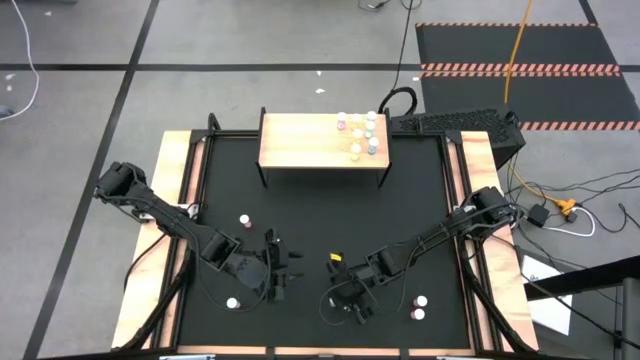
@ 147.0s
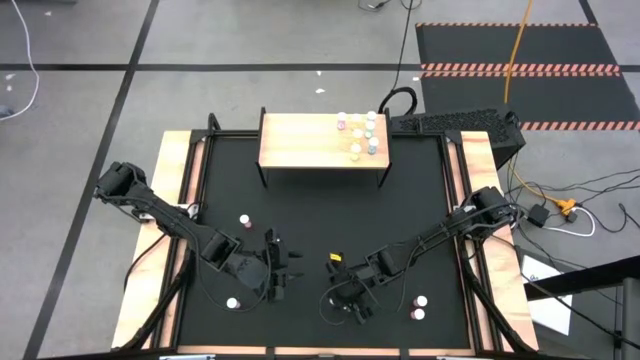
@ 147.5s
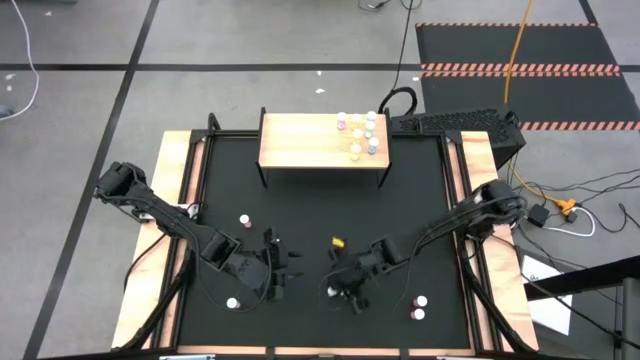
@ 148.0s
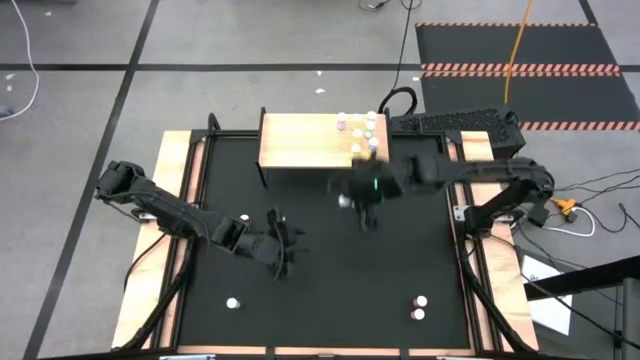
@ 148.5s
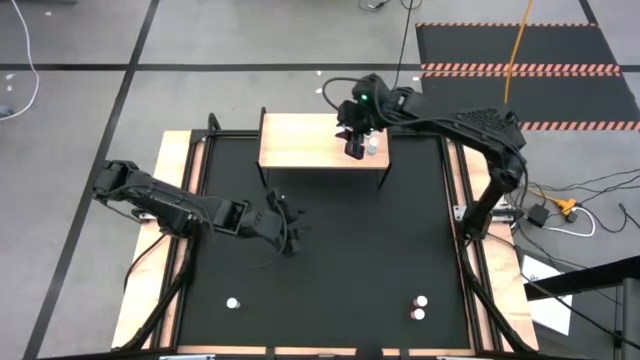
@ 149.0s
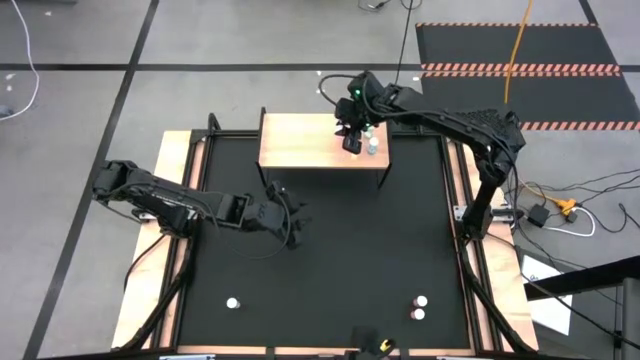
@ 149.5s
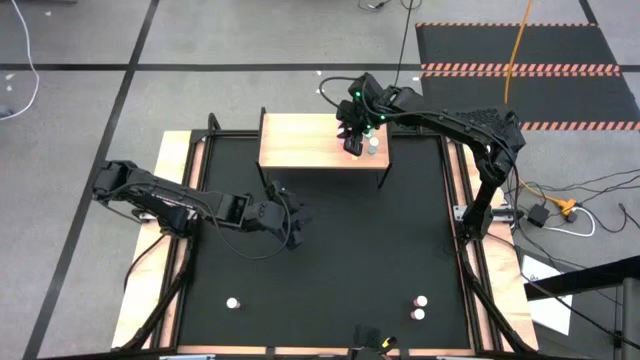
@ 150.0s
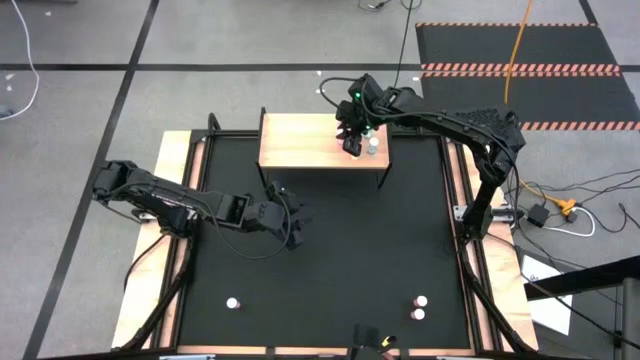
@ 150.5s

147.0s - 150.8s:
Task: Pick and place medicine bottles onto shelf by color
Put the right pink pill bottle on the shelf aligned with the other pink pill bottles

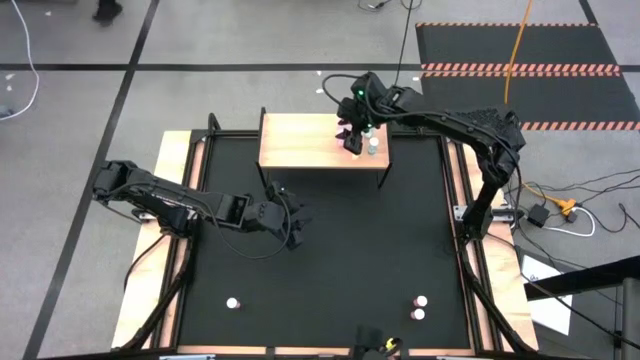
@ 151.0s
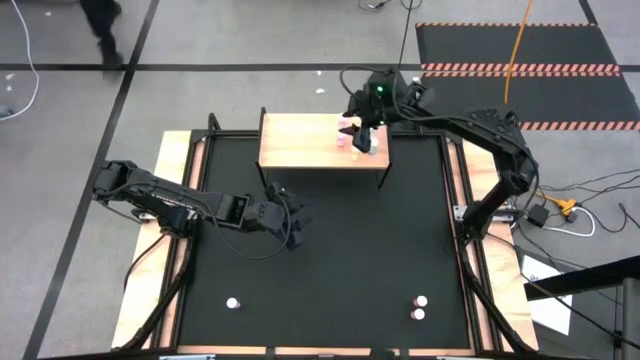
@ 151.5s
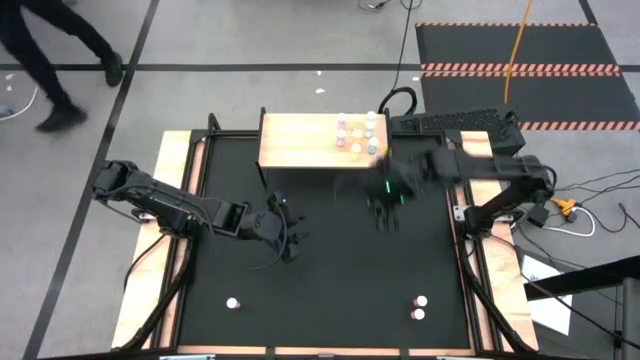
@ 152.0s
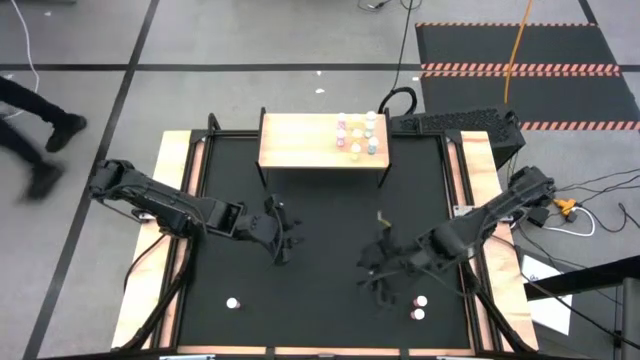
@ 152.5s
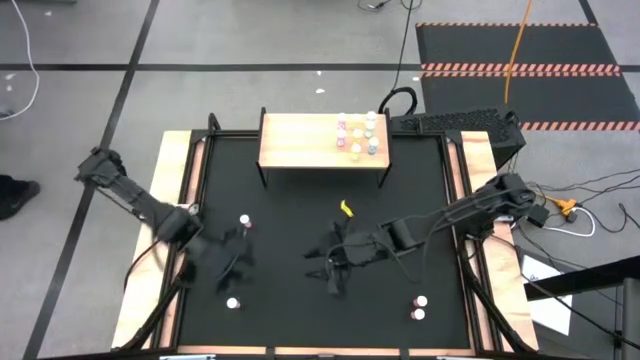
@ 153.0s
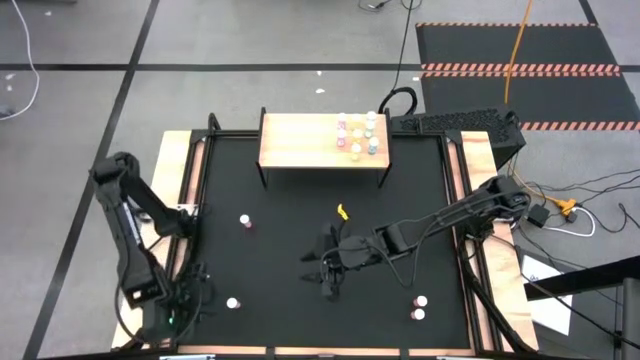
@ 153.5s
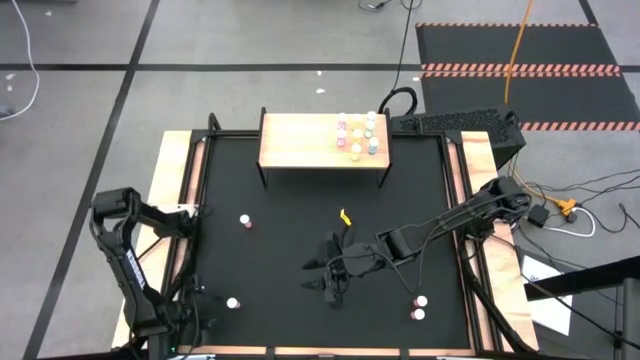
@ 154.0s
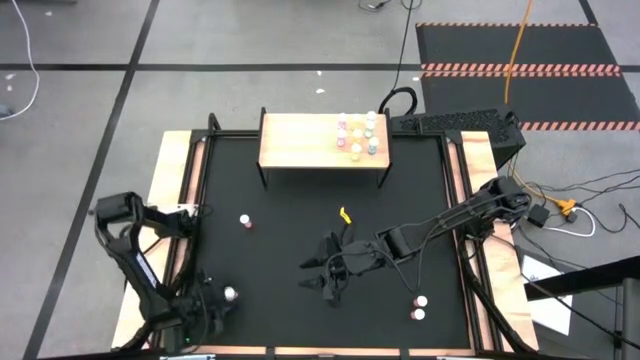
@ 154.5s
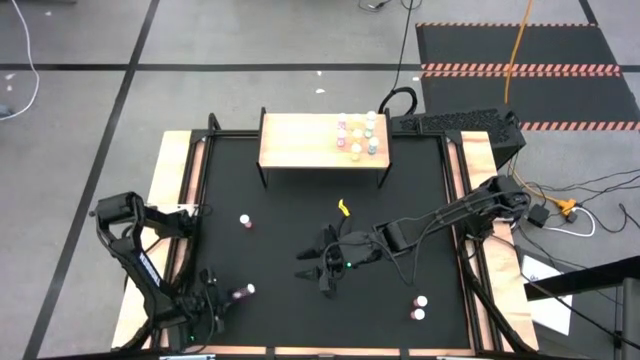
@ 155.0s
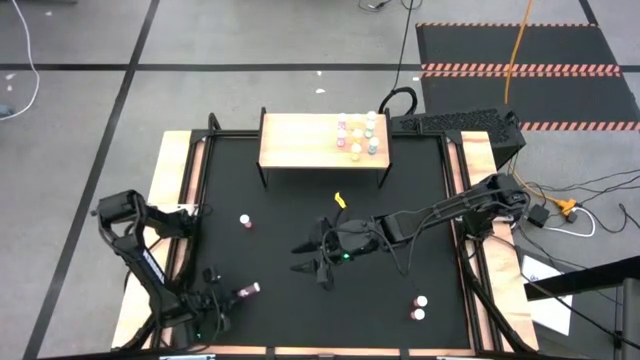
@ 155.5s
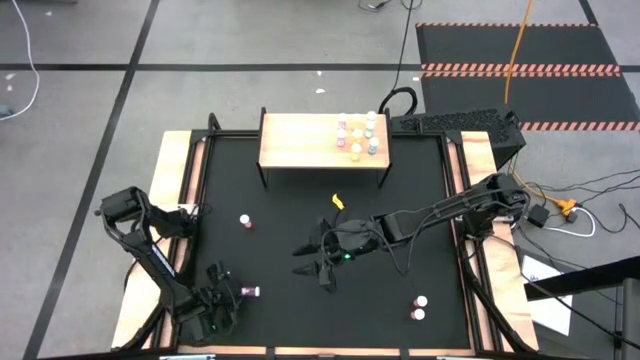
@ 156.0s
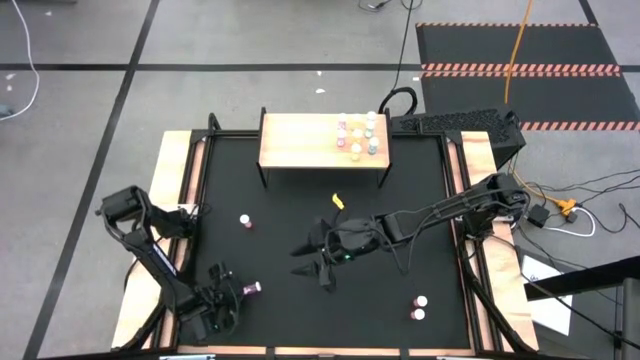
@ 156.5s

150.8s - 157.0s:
Put the pink pill bottle on the shelf aligned with the other pink pill bottles

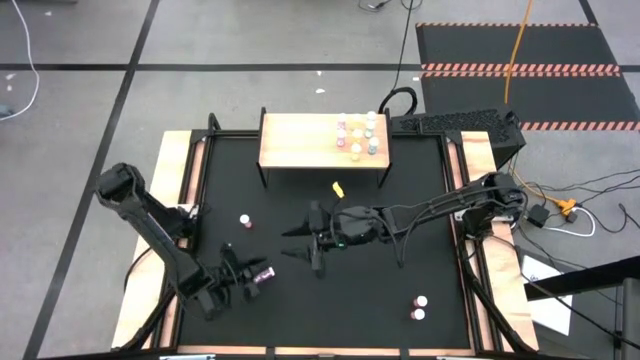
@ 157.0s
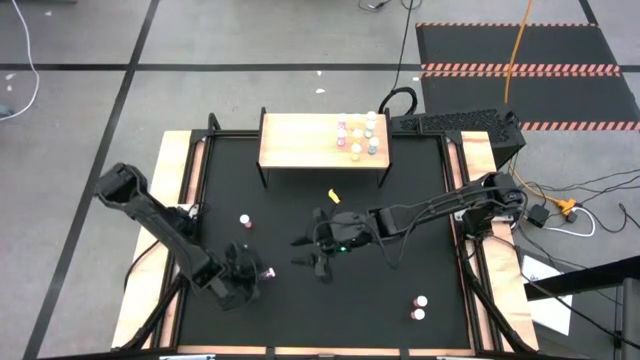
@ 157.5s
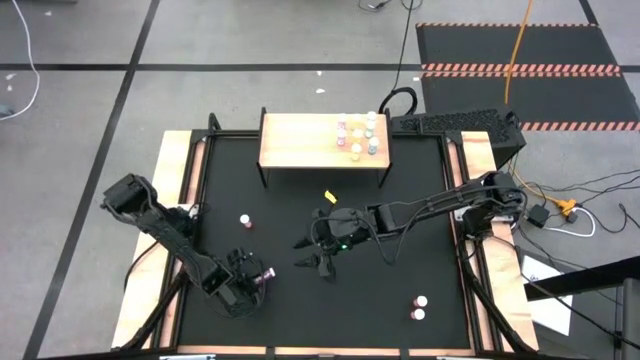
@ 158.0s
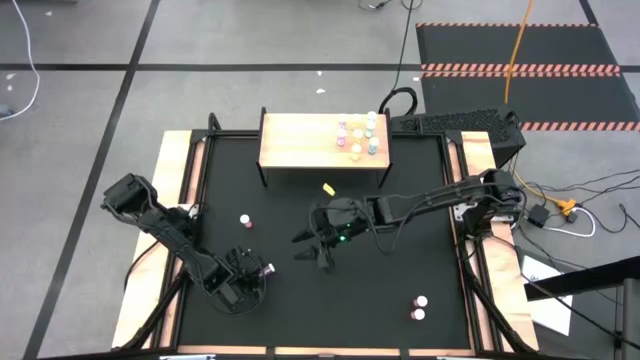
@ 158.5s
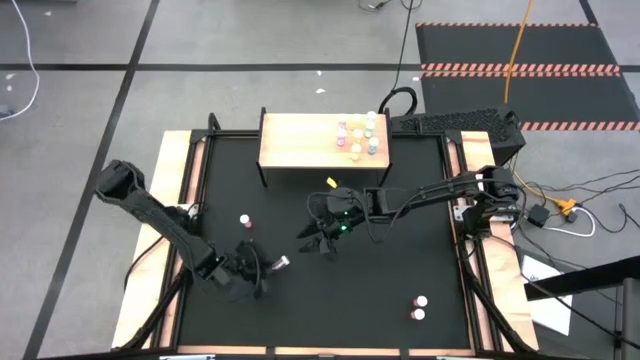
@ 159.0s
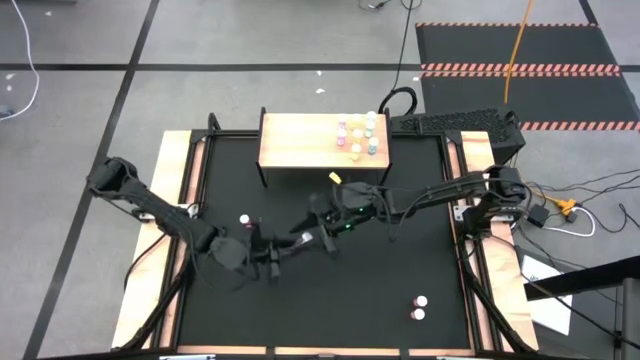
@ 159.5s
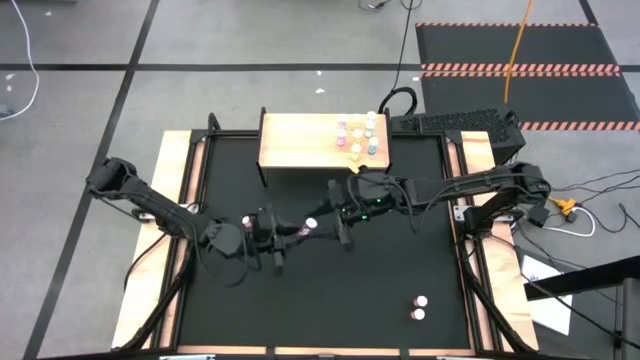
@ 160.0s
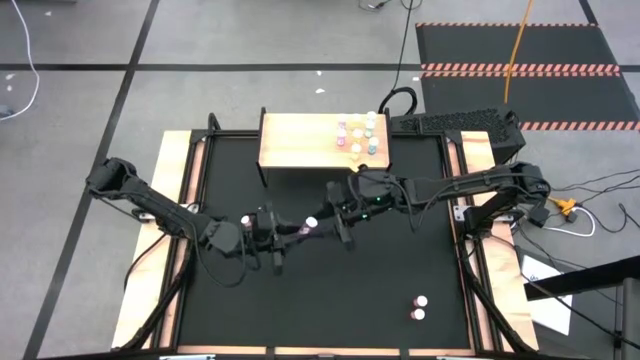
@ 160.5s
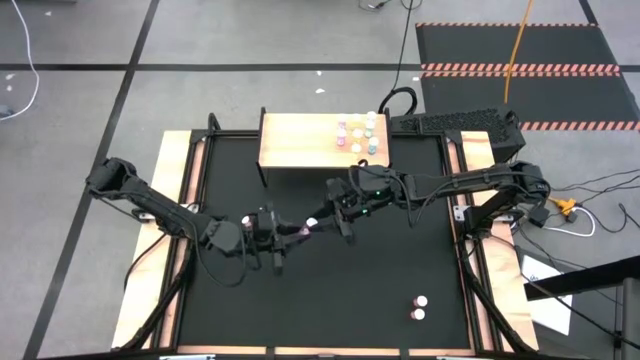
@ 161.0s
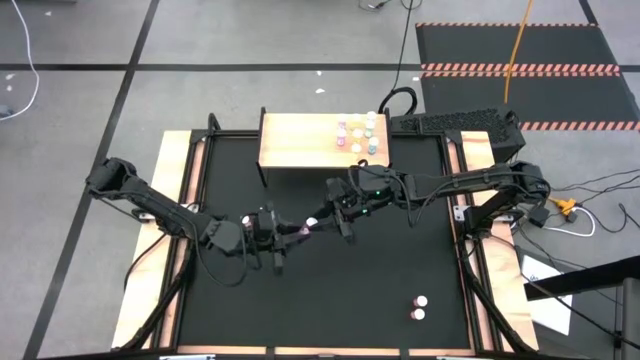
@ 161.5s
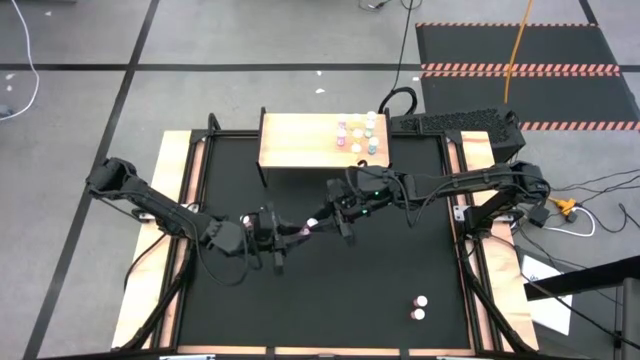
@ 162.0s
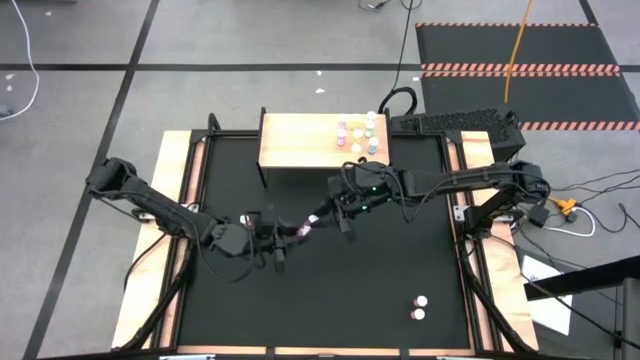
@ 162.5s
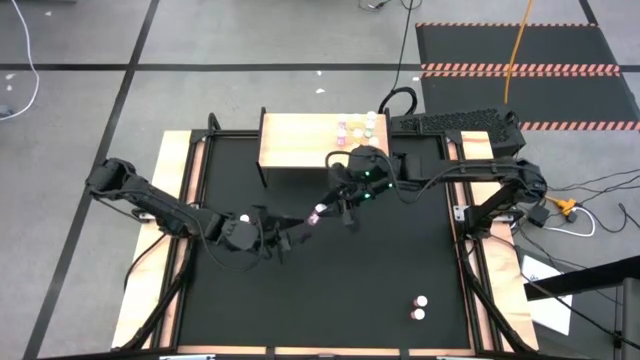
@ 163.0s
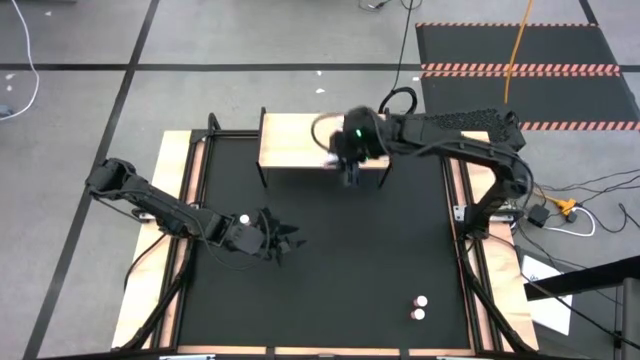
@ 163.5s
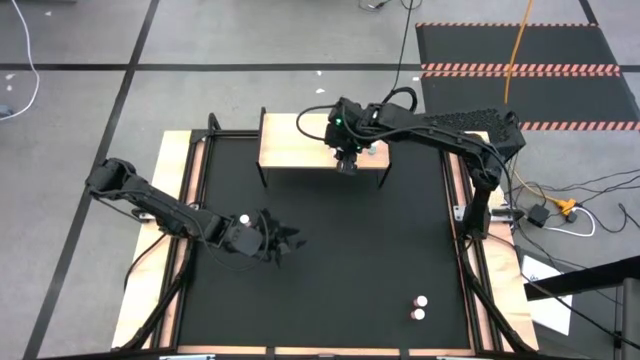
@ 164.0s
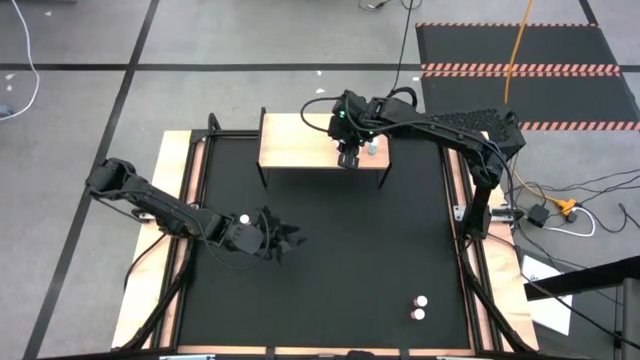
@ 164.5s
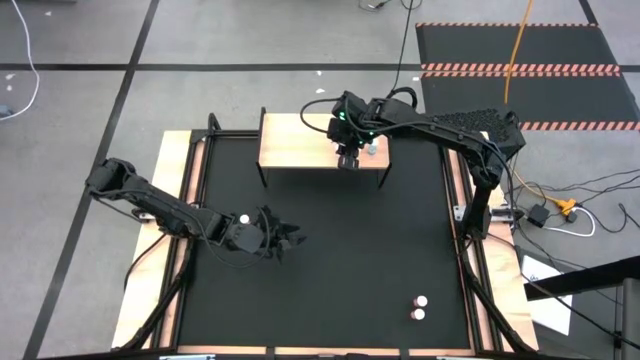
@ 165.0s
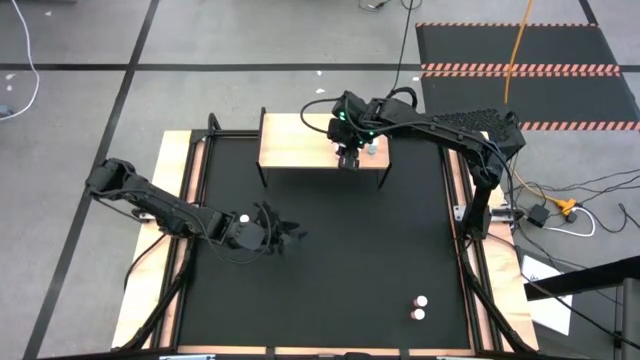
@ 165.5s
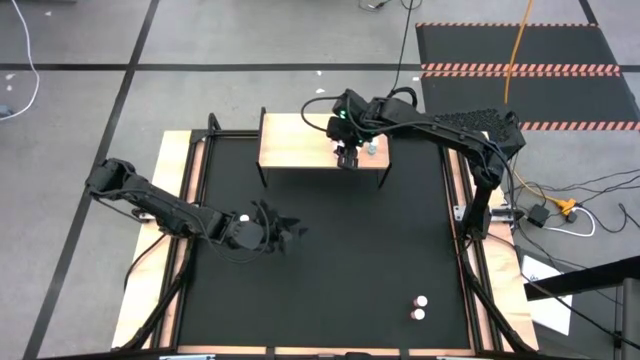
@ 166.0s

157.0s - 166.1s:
Put the pink pill bottle on the shelf aligned with the other pink pill bottles
